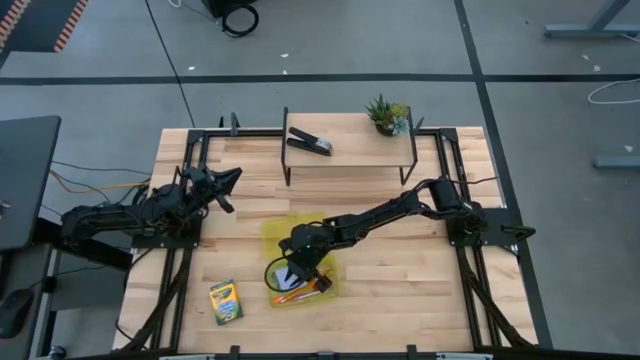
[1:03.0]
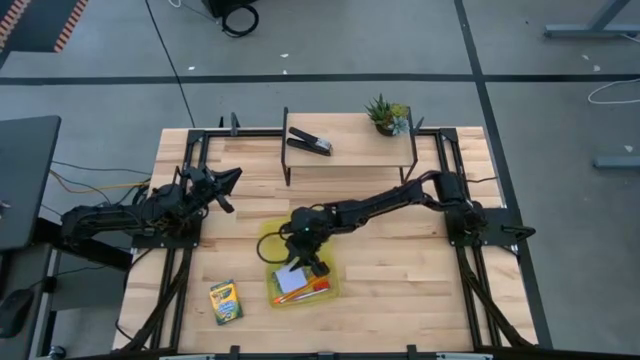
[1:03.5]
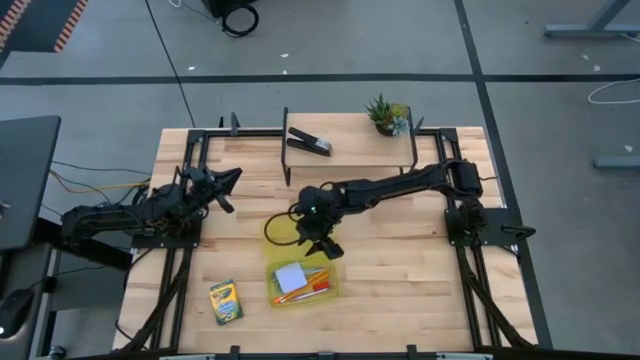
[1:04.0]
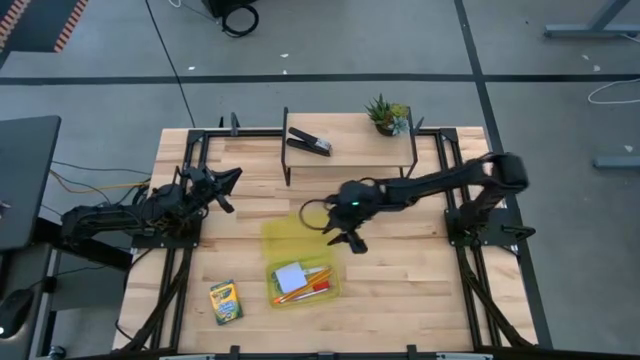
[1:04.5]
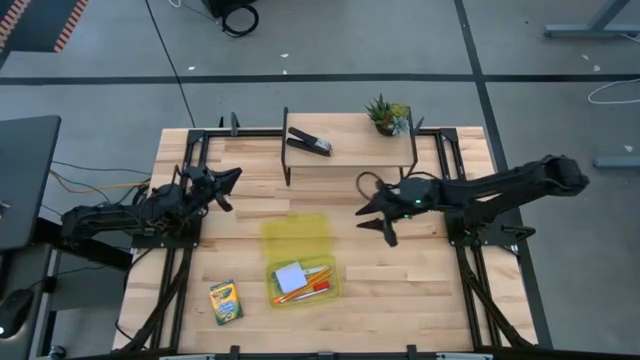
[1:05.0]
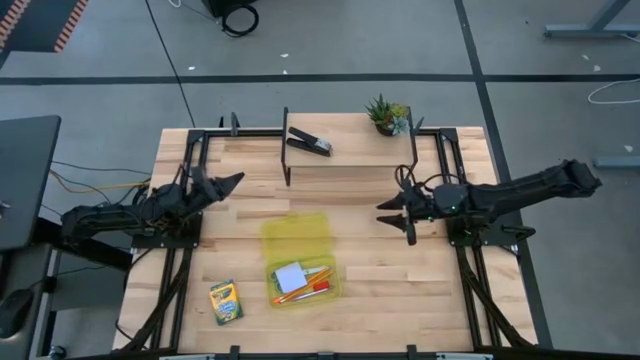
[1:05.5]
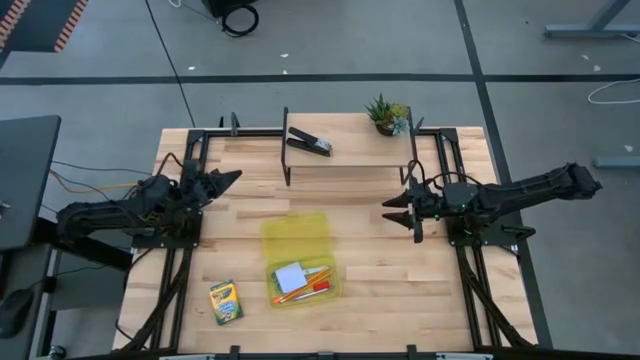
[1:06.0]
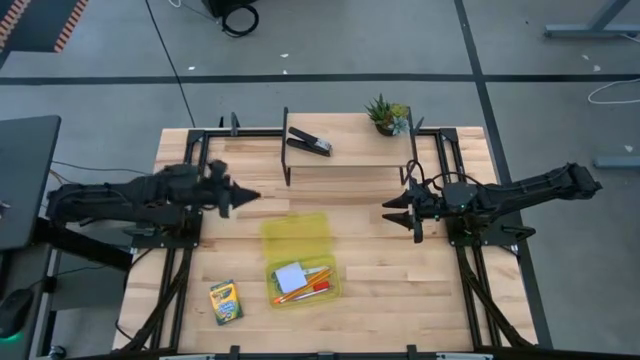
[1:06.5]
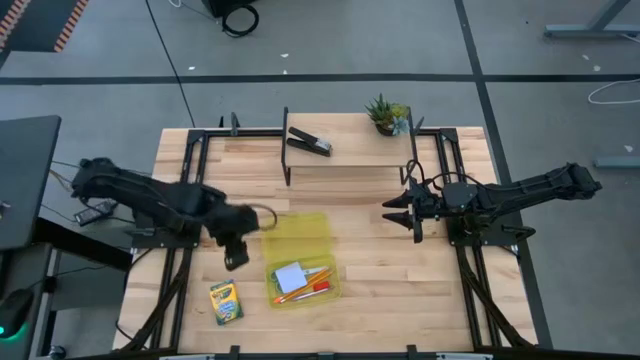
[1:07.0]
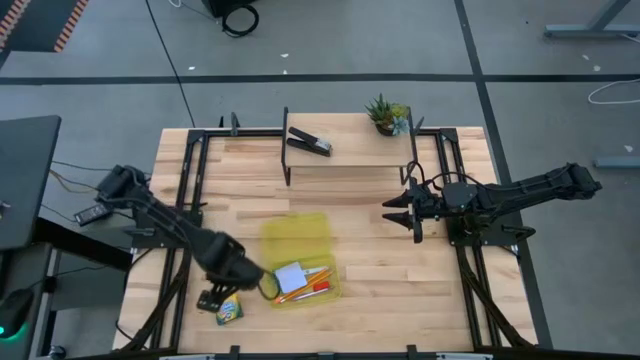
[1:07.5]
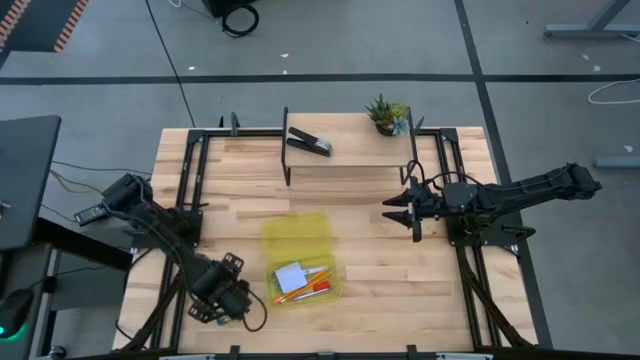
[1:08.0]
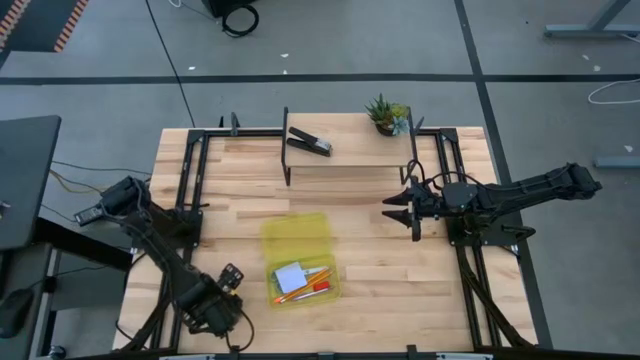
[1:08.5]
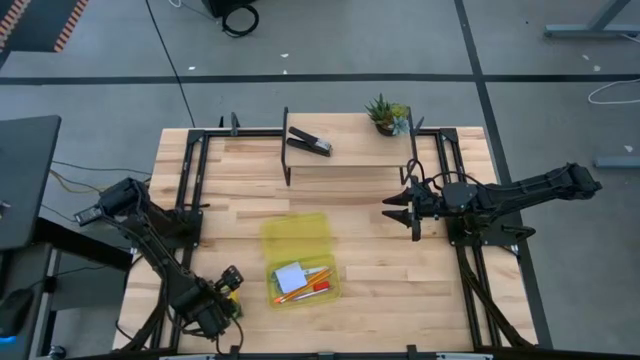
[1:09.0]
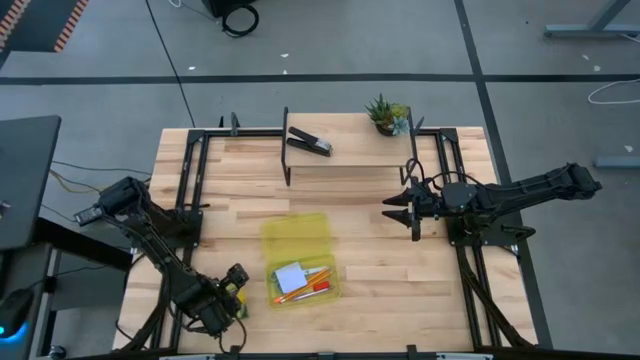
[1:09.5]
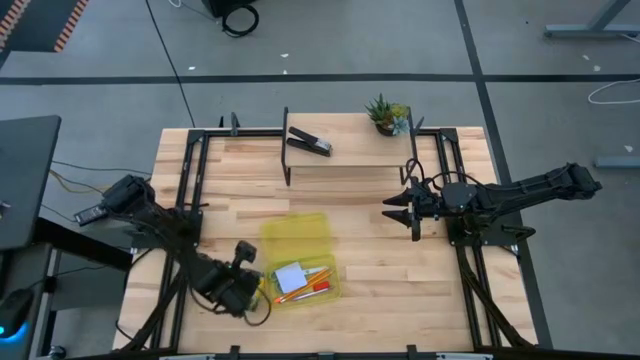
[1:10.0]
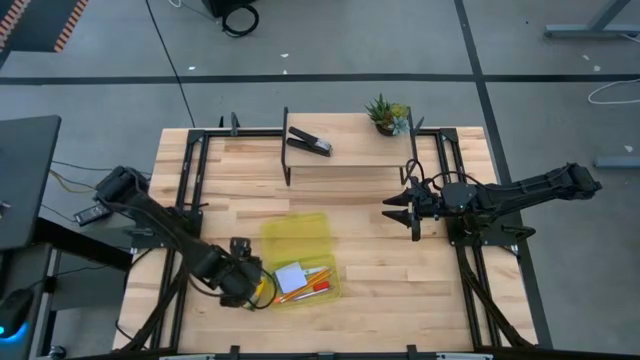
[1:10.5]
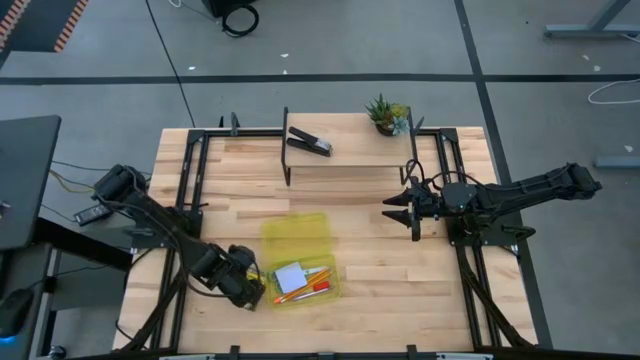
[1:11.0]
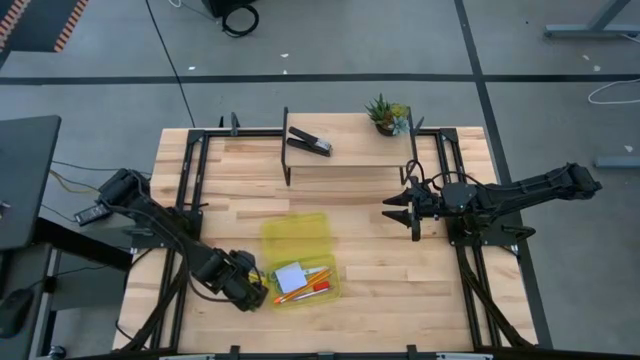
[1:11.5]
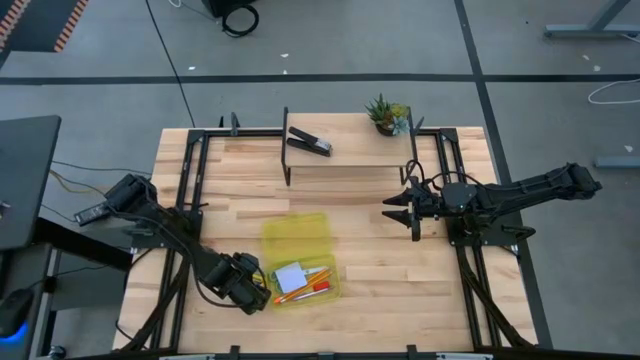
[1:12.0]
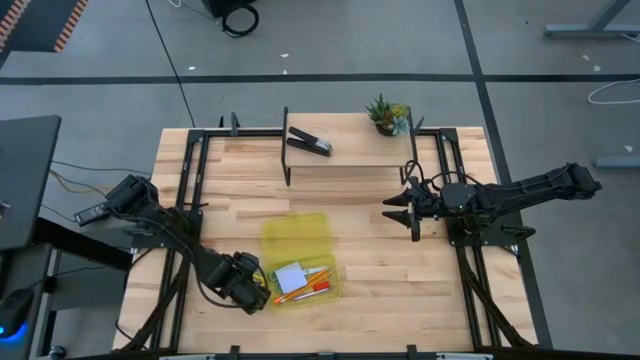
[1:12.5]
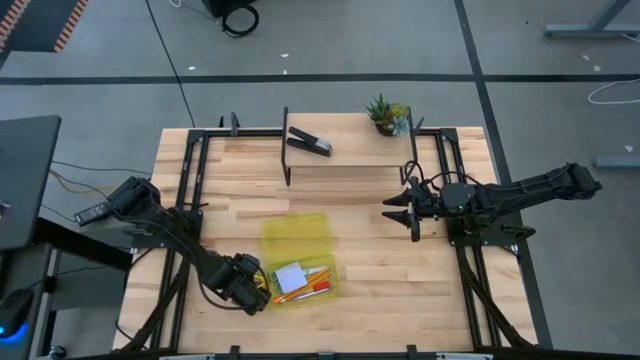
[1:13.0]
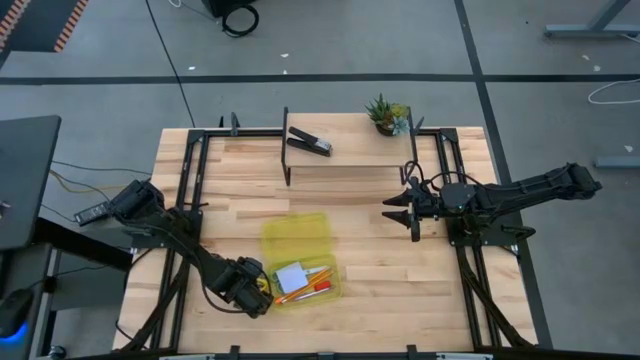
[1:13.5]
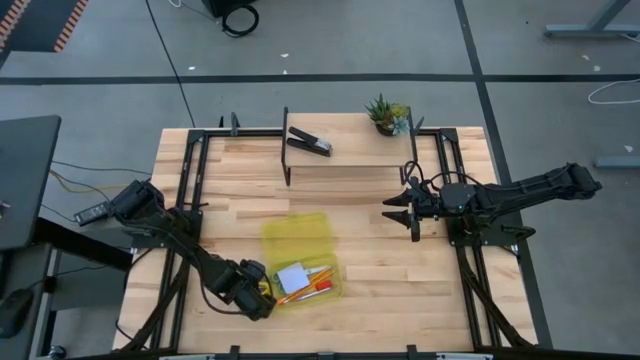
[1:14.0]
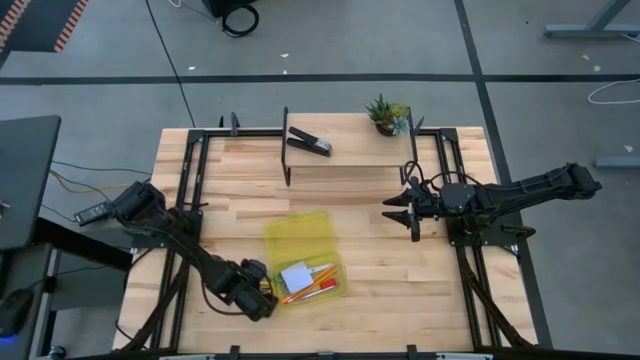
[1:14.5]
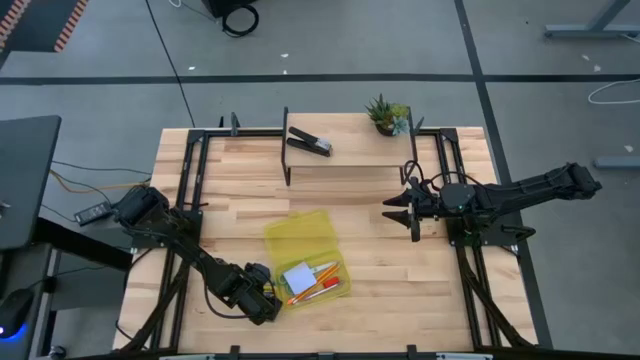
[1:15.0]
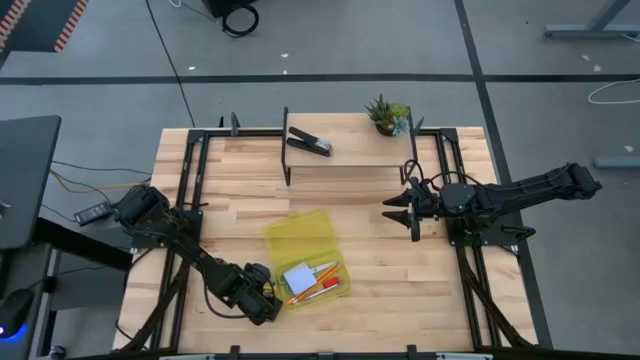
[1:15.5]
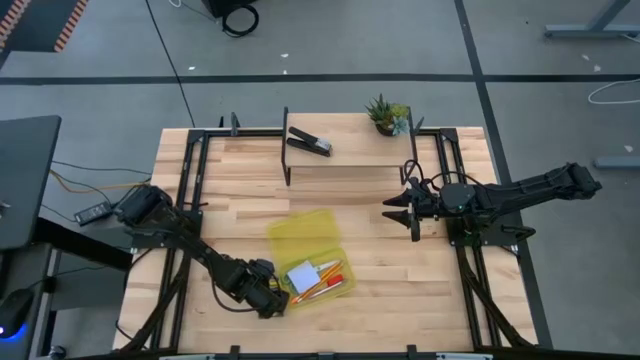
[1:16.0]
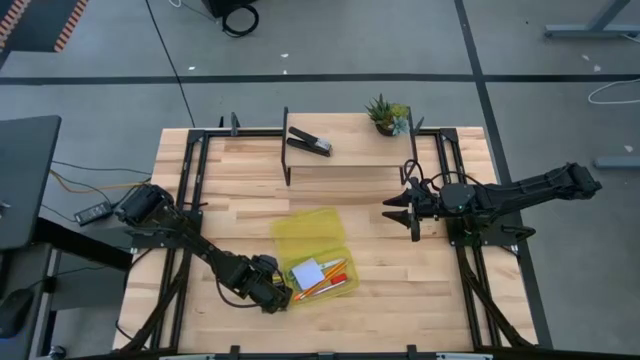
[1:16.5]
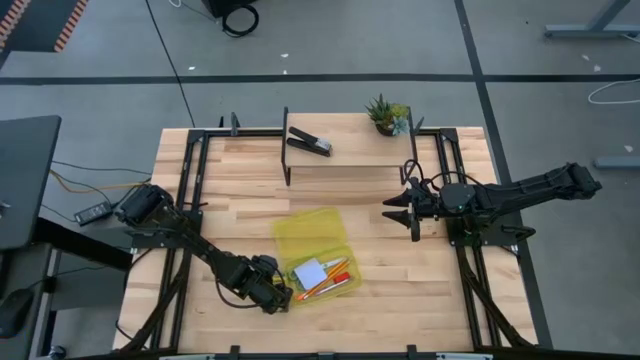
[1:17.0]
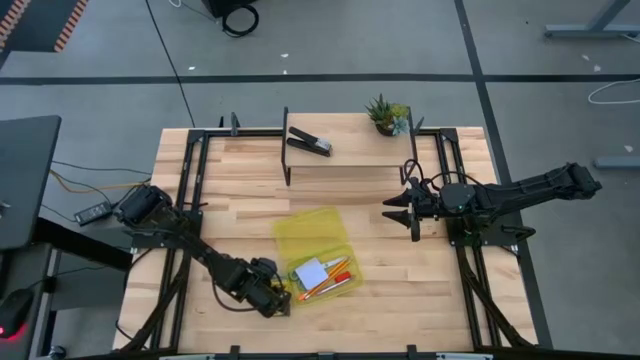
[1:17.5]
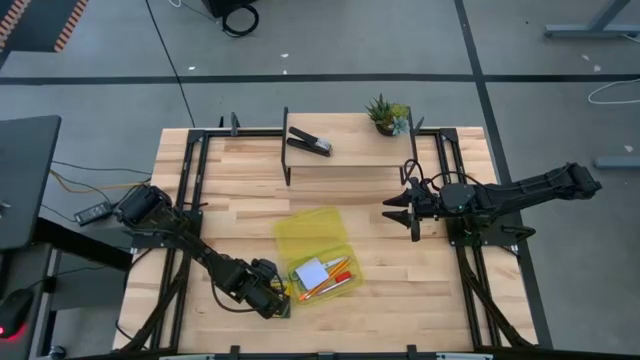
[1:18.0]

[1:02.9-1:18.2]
Task: Pack school essentials
Put the crayon box into the yellow supply box

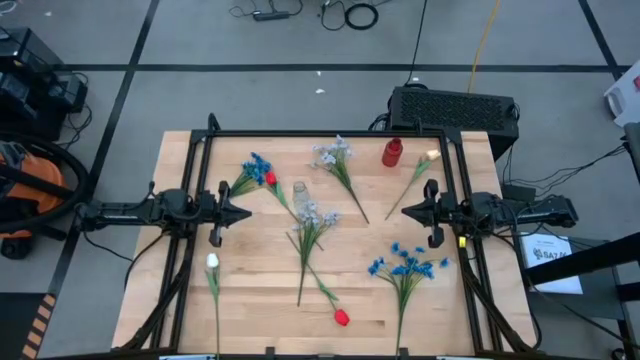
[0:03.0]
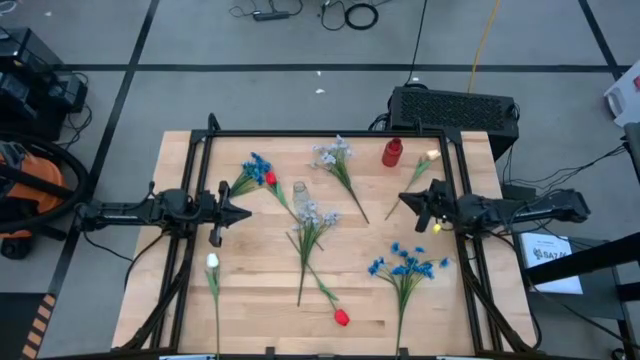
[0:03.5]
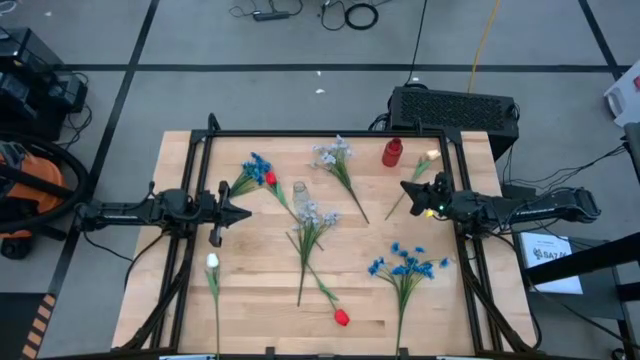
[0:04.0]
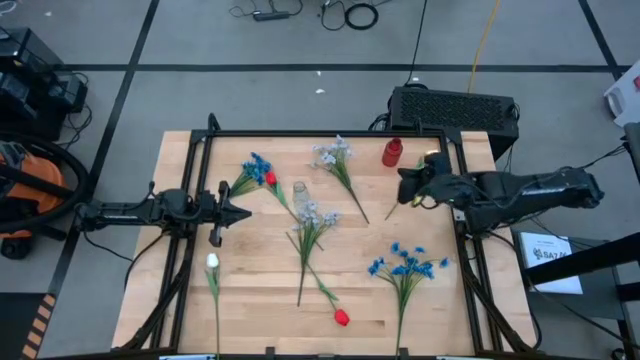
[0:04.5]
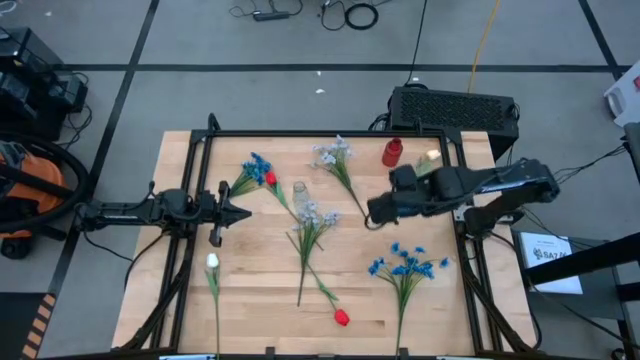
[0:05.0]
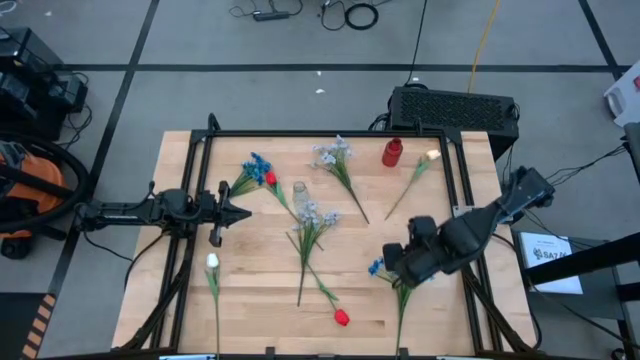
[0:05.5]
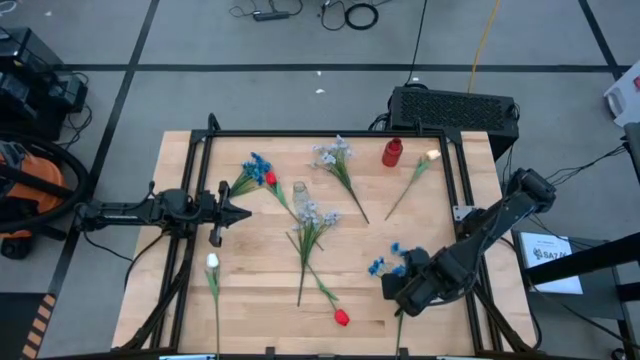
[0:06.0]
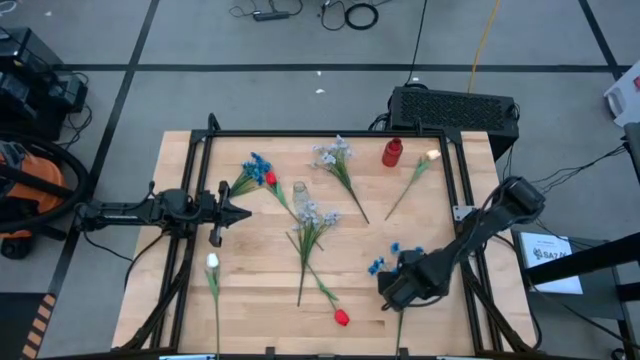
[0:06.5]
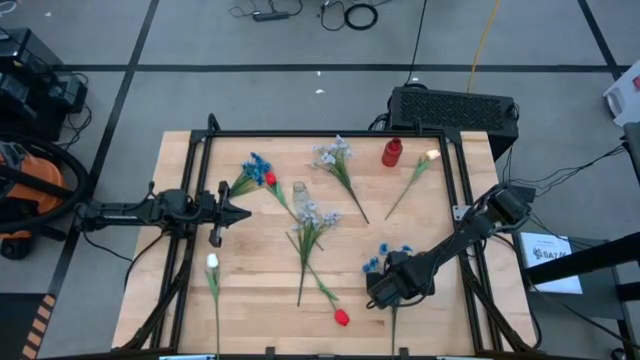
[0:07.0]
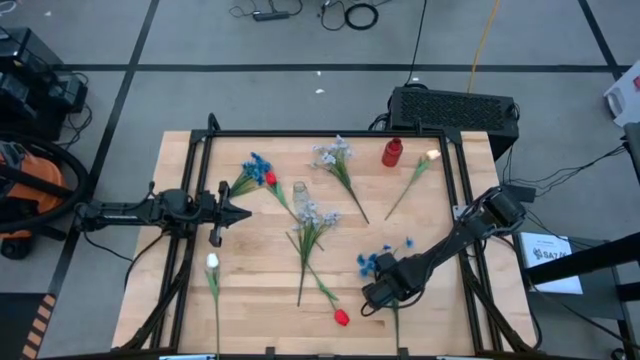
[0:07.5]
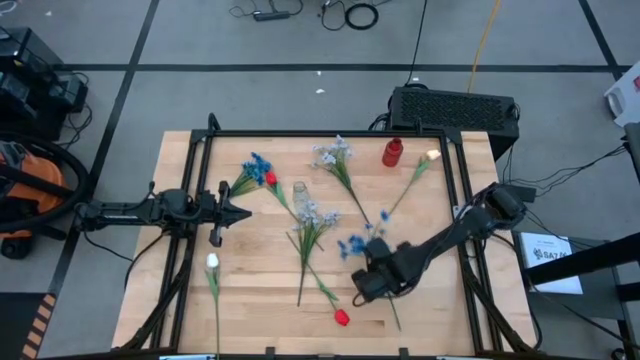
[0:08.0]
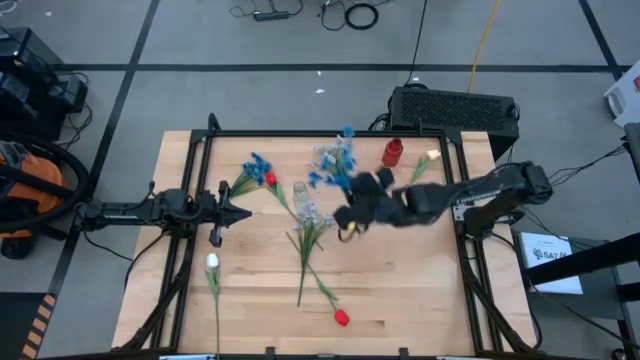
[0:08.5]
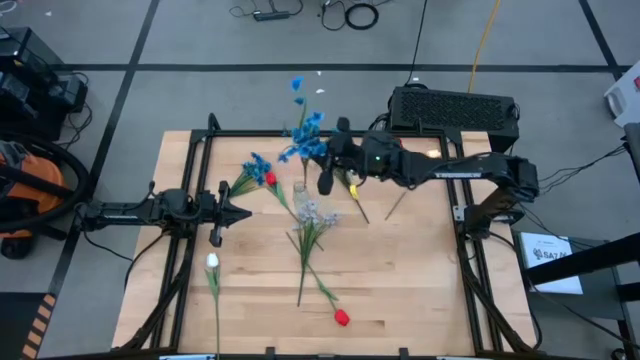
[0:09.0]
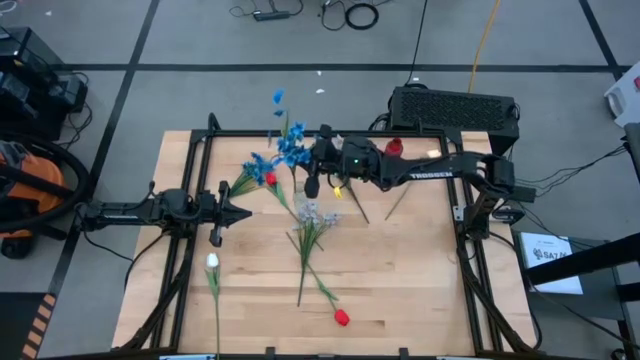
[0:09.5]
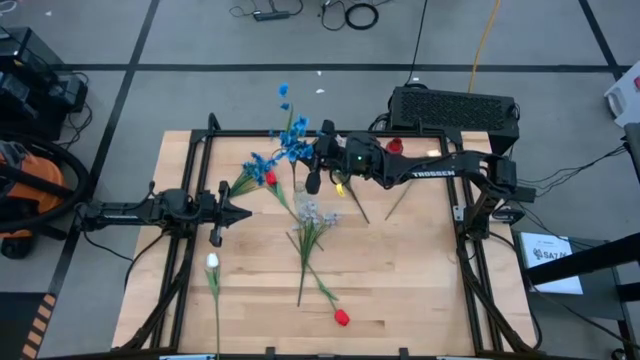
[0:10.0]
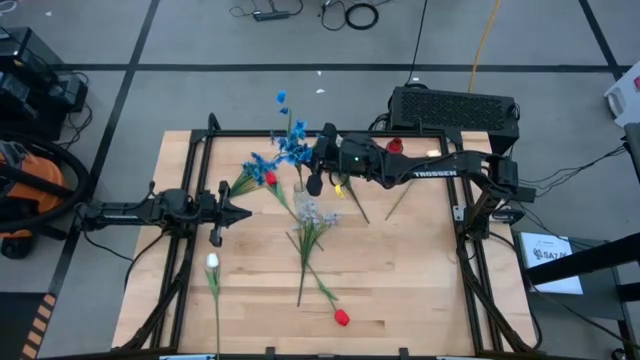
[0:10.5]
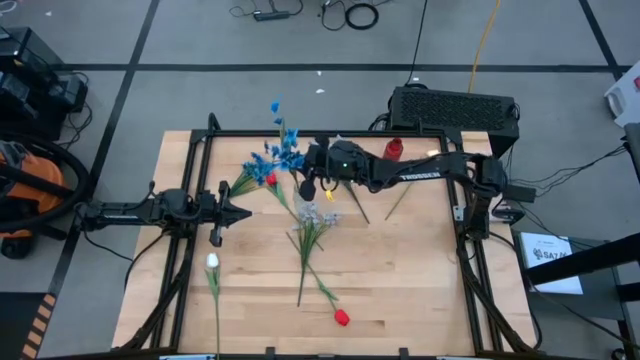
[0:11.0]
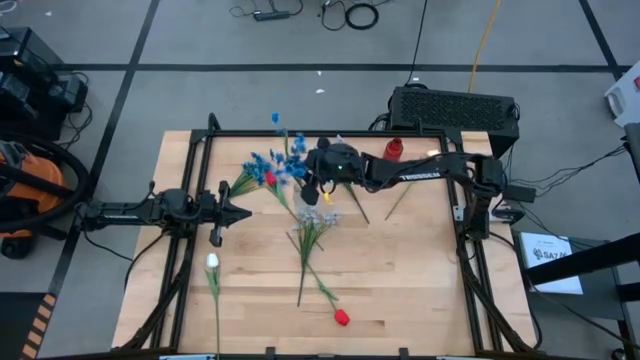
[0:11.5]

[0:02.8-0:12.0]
Task: Sort flowers into vase by color
Put the bottom blue flowers into the transparent vase
